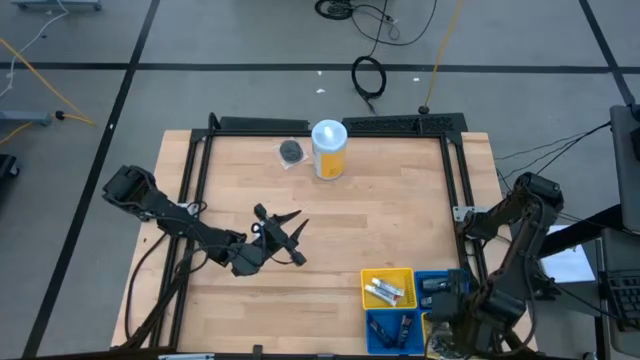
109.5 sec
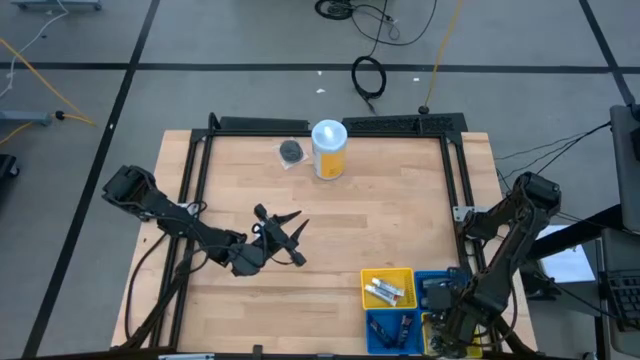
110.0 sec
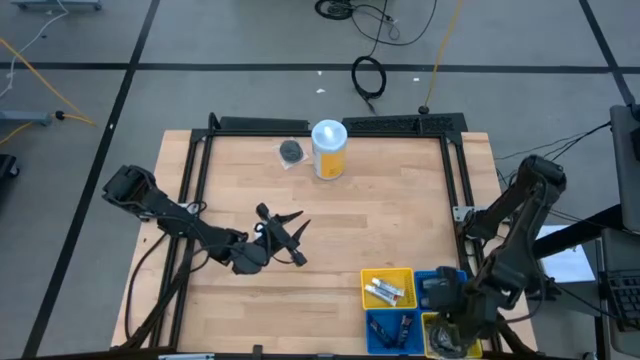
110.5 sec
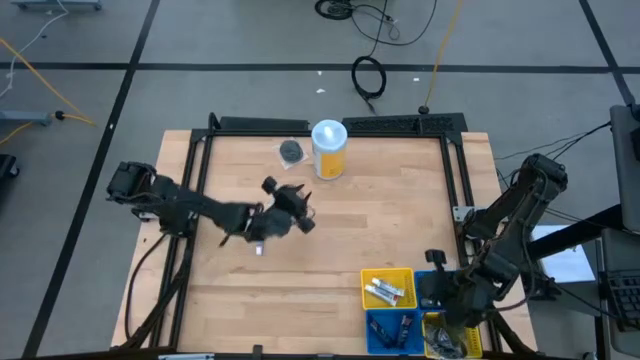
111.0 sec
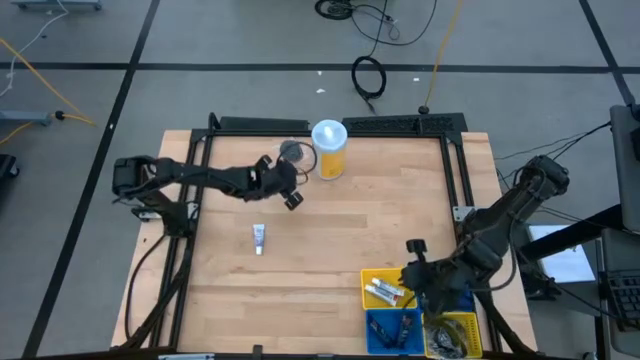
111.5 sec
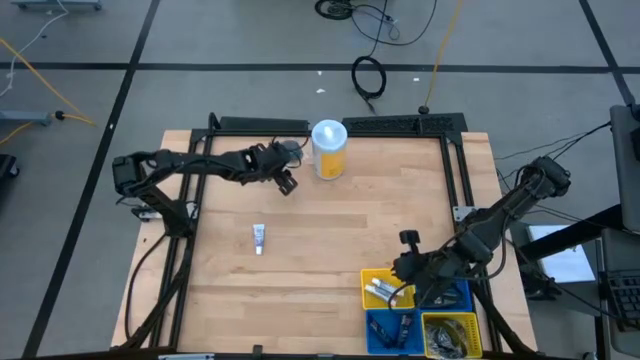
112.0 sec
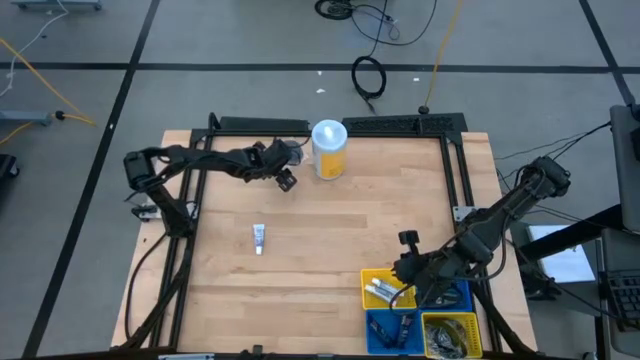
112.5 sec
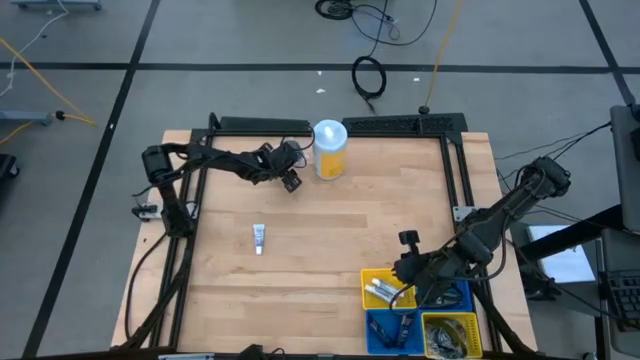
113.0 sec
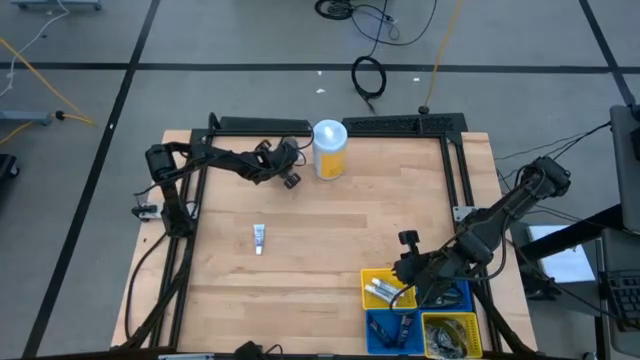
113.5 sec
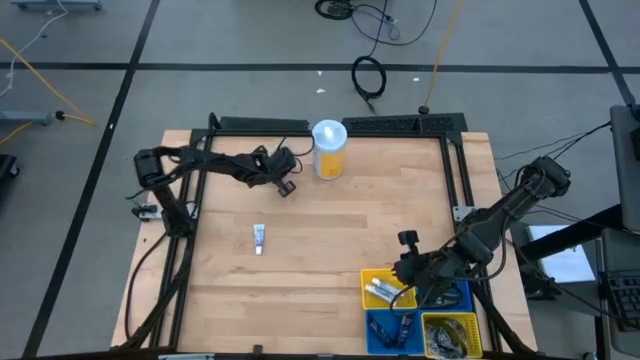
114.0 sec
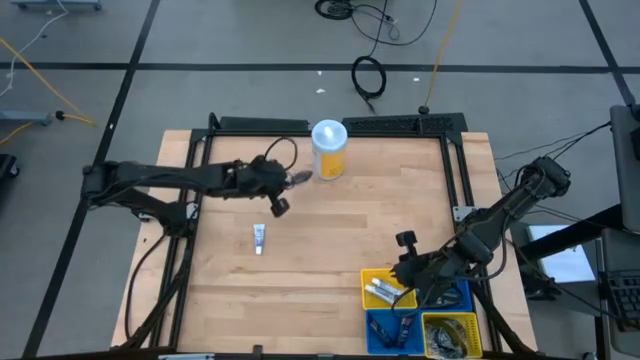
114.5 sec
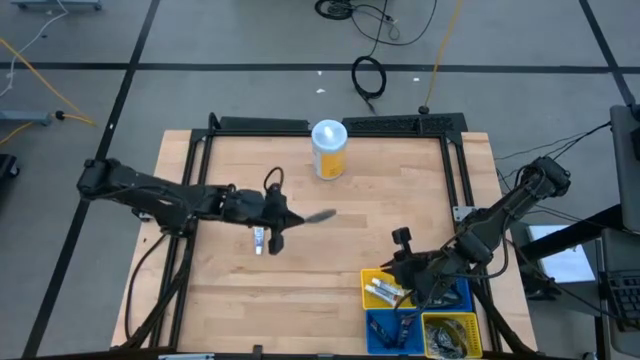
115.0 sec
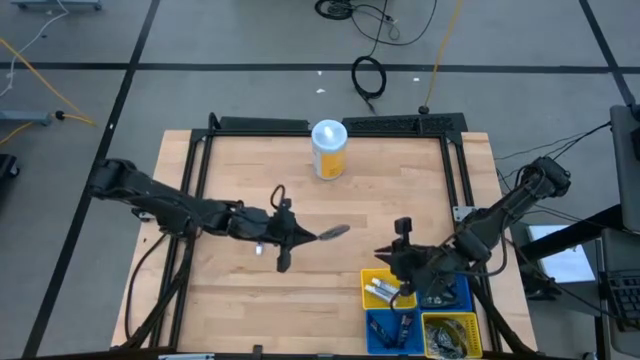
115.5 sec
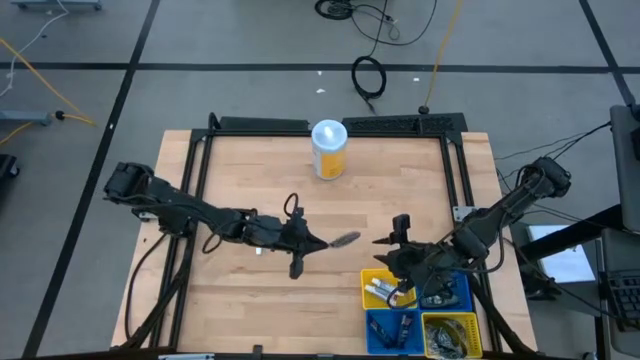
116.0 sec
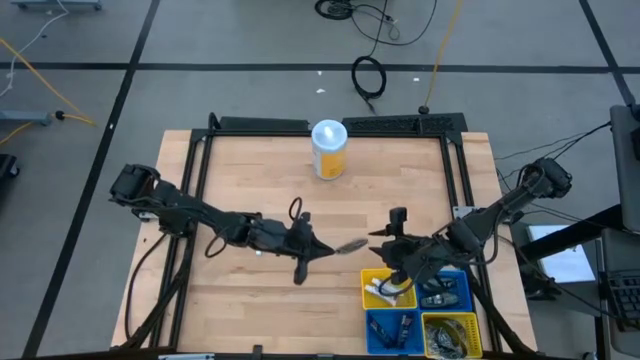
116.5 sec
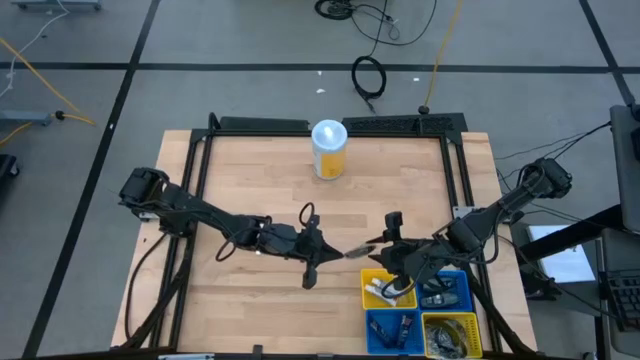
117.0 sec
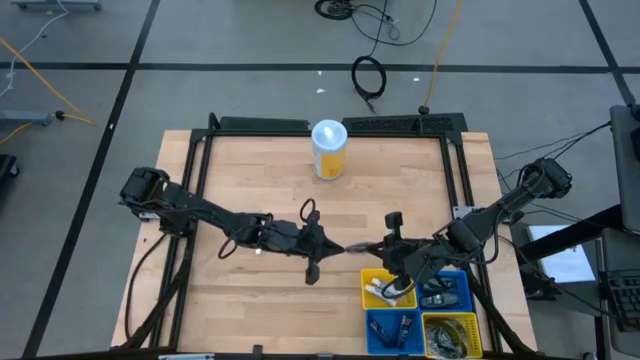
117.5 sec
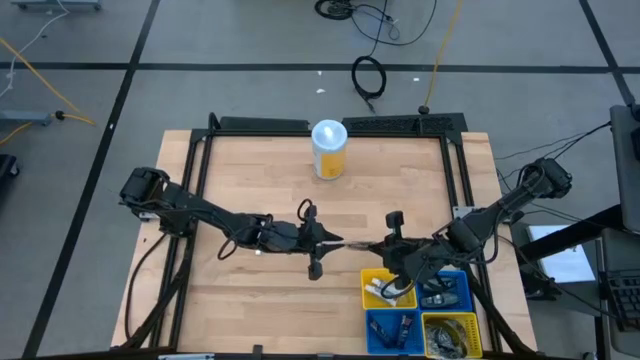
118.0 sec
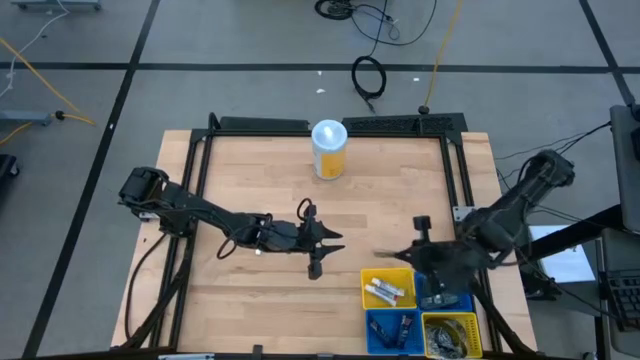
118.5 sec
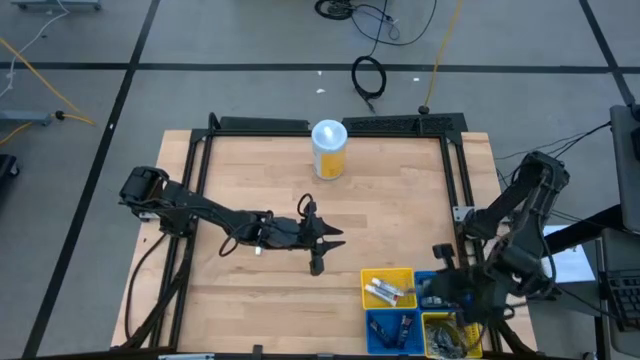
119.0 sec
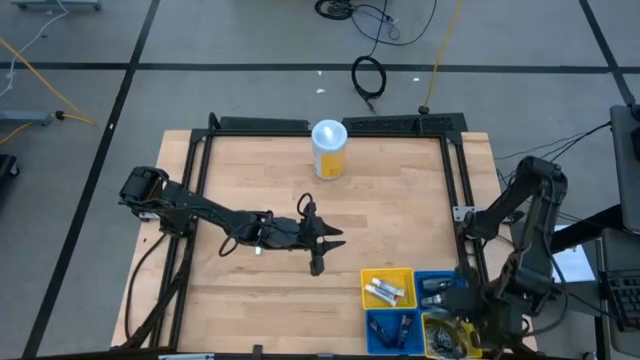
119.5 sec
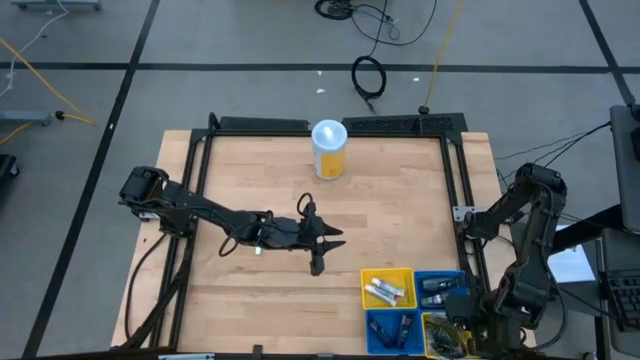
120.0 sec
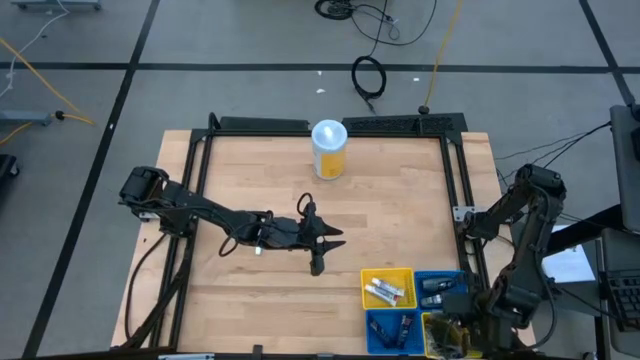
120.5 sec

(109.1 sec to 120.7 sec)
Task: Pick & Place Travel size toiletries
Put the hairbrush into the bottom yellow basket

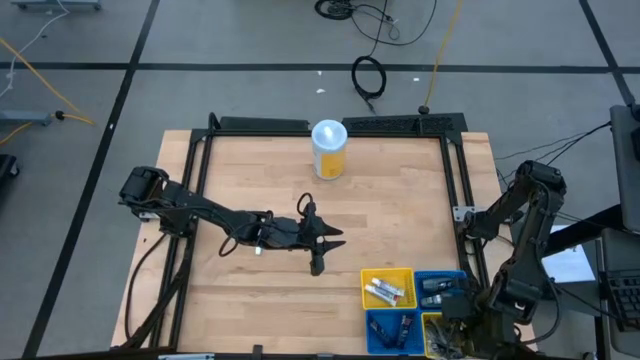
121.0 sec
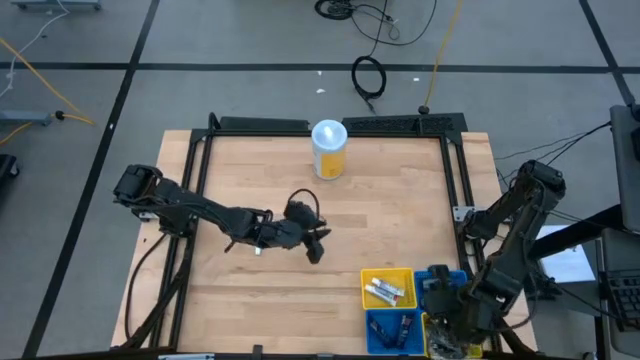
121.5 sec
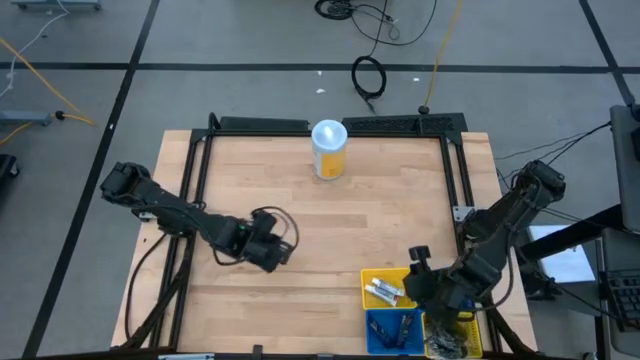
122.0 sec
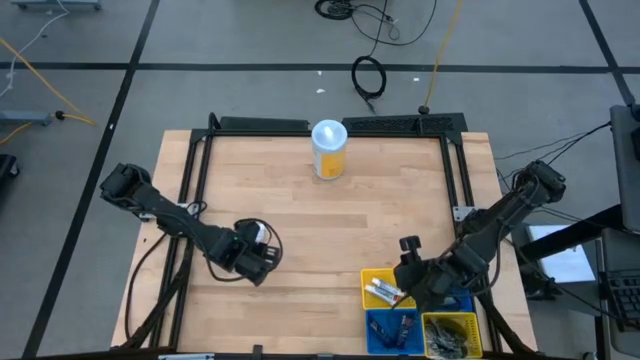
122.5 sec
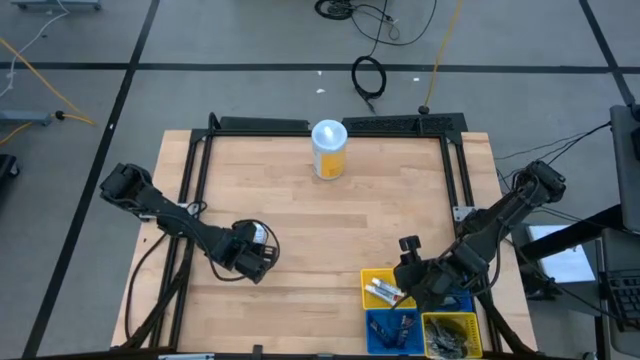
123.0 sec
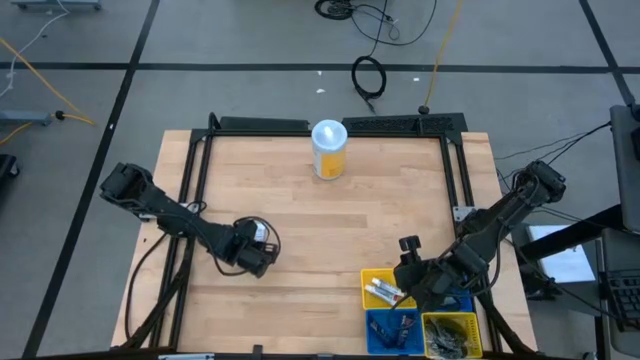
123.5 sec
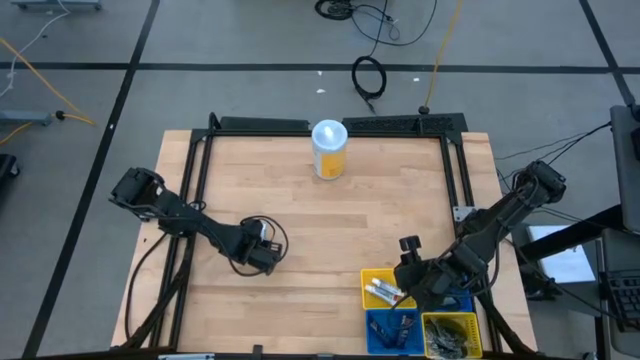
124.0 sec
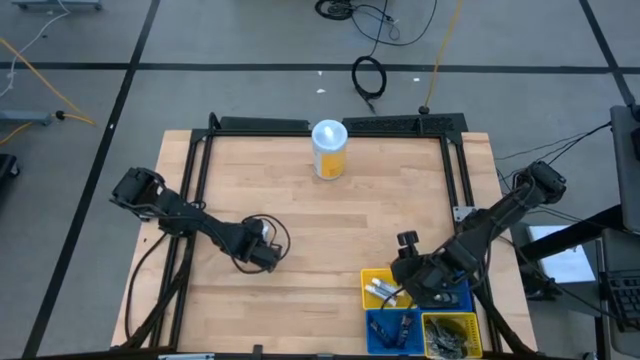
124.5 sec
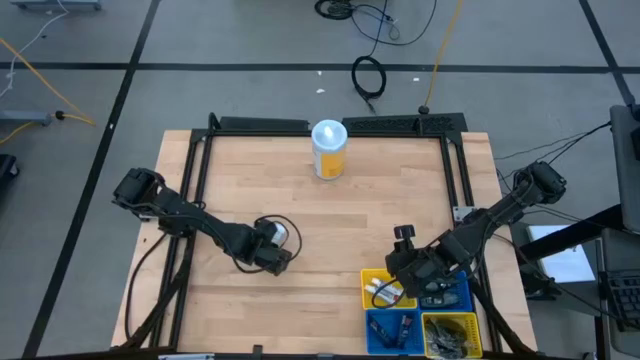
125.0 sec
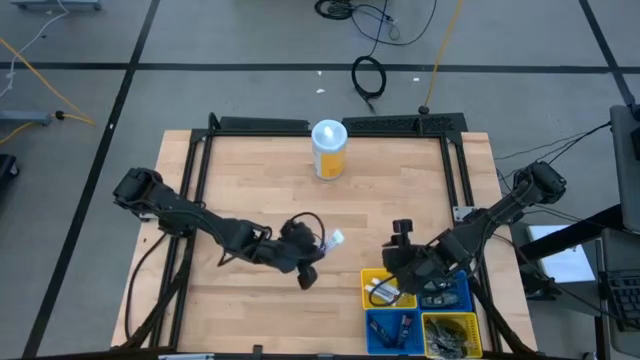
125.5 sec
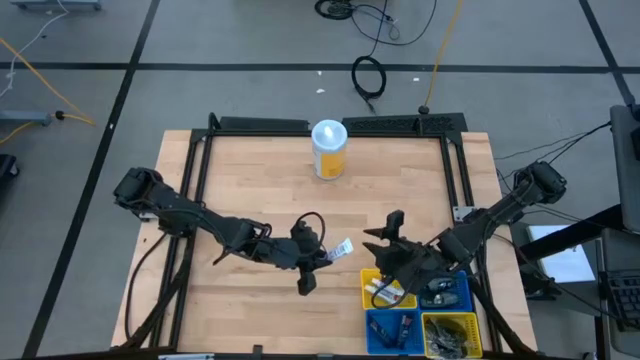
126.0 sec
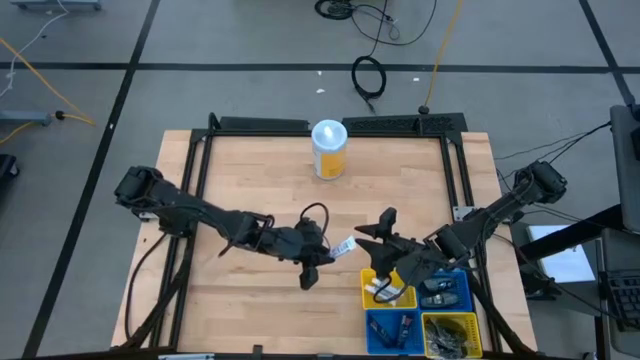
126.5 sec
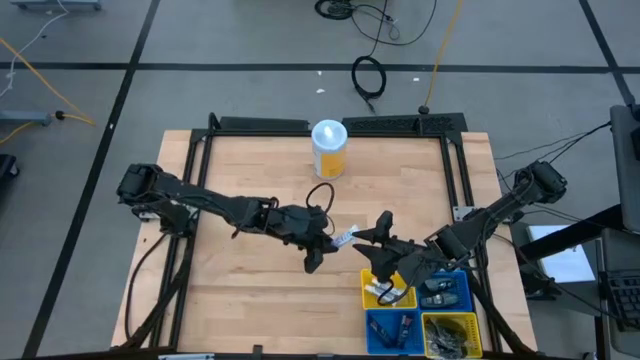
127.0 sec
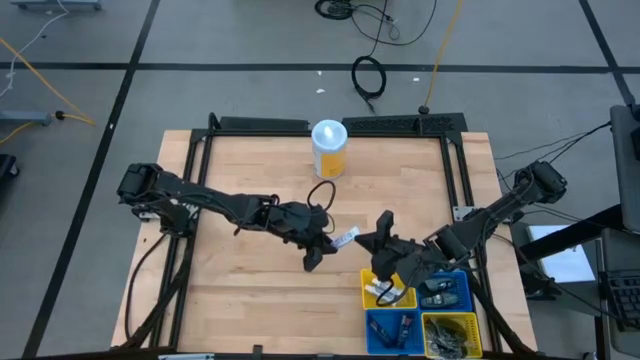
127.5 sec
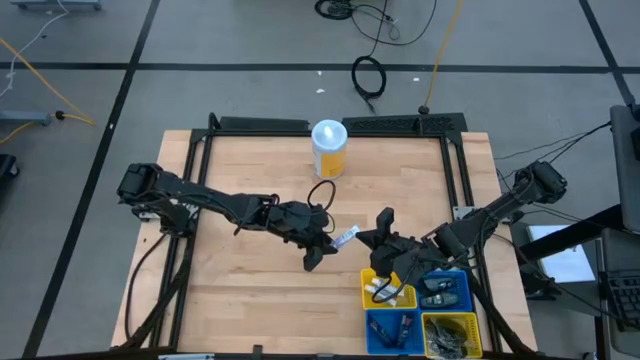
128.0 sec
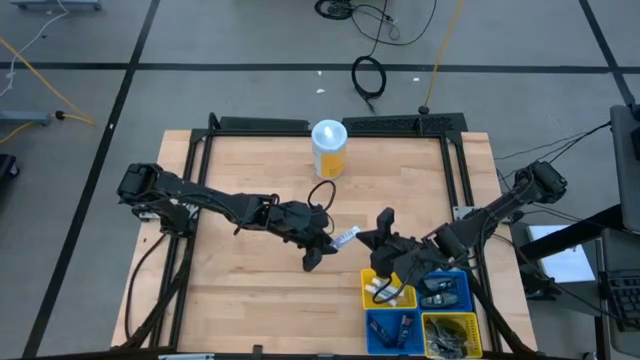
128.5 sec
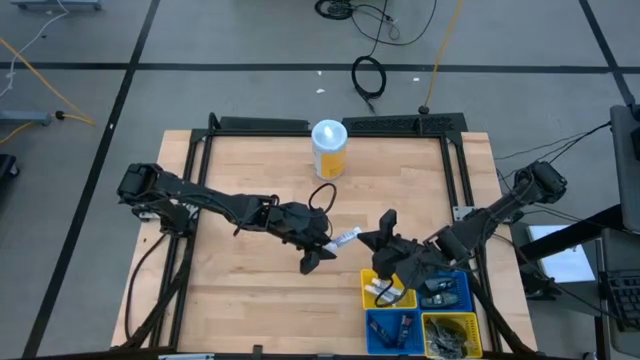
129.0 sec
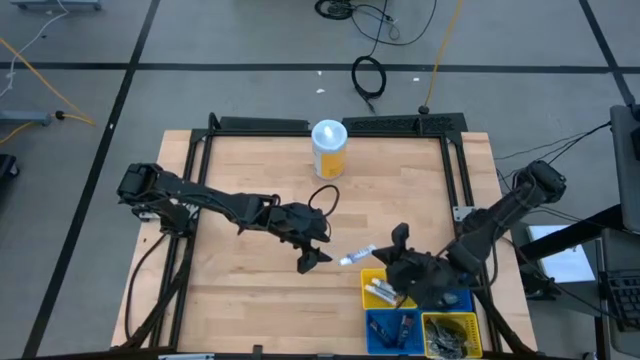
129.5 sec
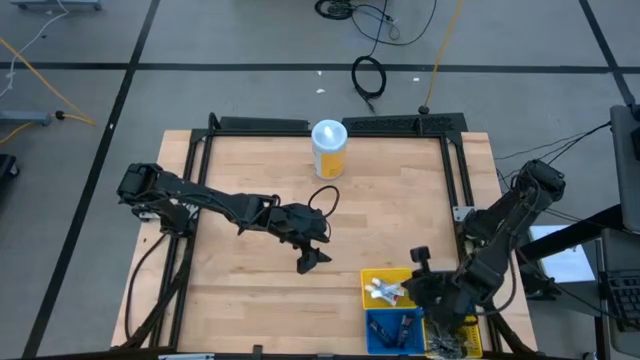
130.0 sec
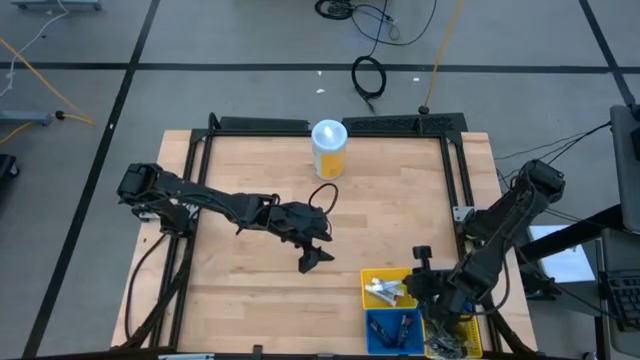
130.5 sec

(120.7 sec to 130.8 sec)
Put the toothpaste into the top yellow basket

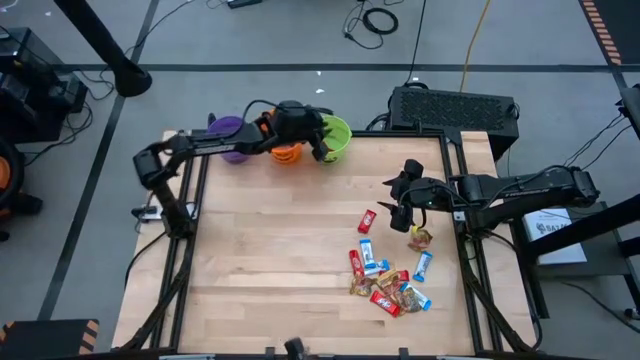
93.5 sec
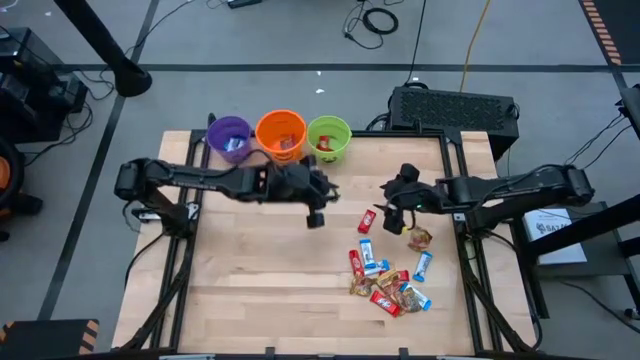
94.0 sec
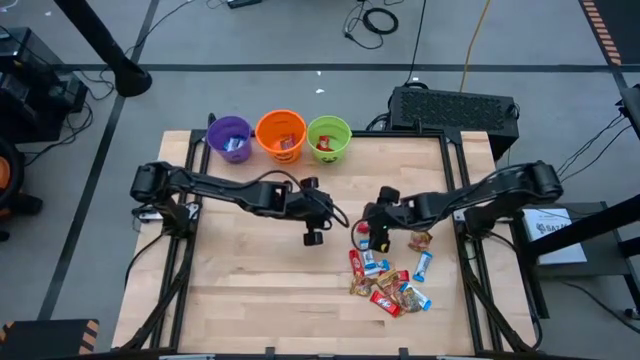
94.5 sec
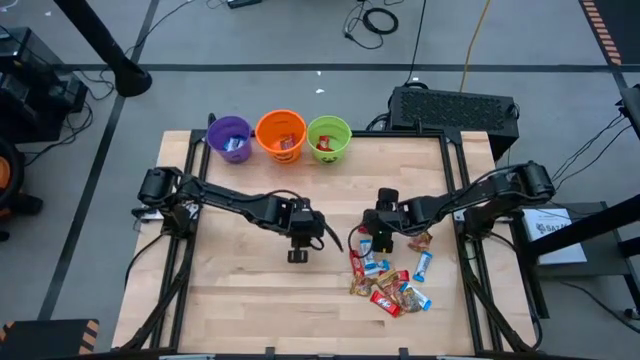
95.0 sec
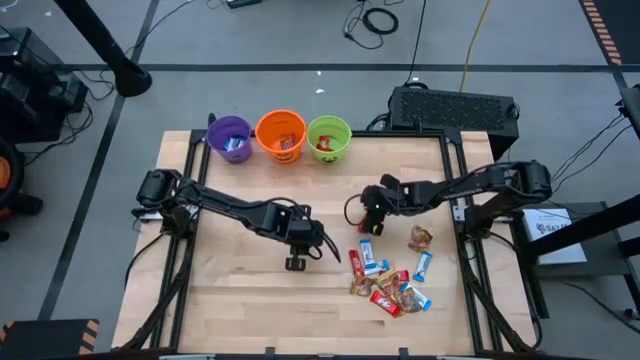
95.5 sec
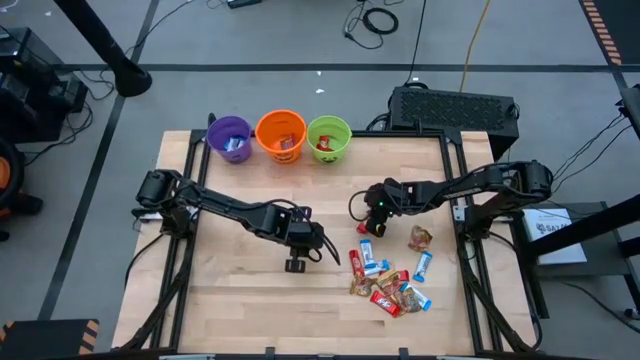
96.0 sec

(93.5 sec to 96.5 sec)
Task: Sort candy by brand, put in halloween buckets
Put the red chocolate bar into the green bucket
